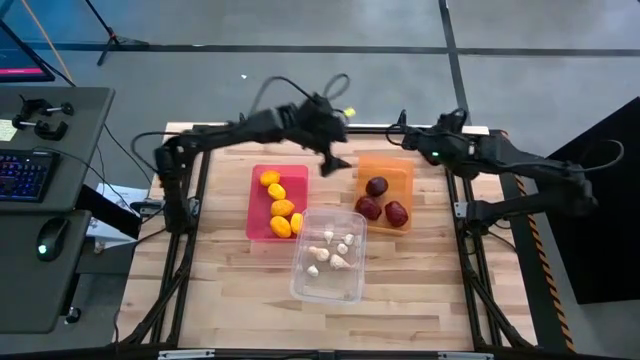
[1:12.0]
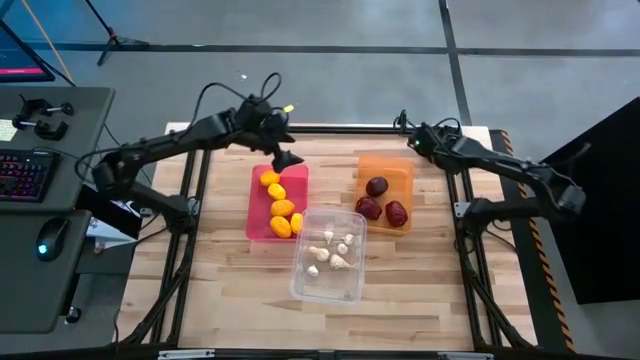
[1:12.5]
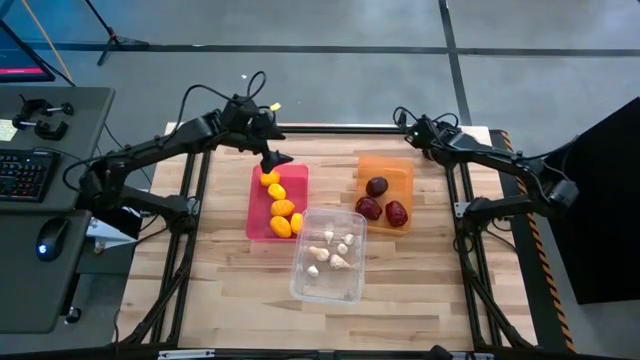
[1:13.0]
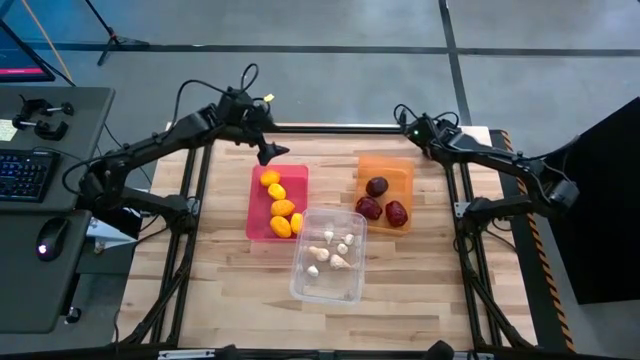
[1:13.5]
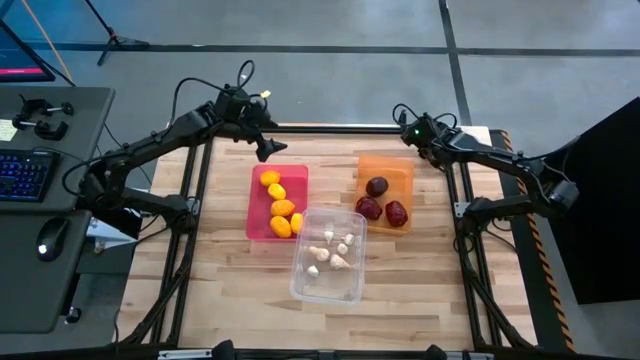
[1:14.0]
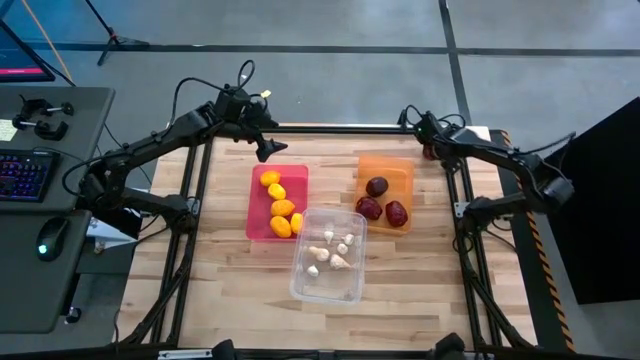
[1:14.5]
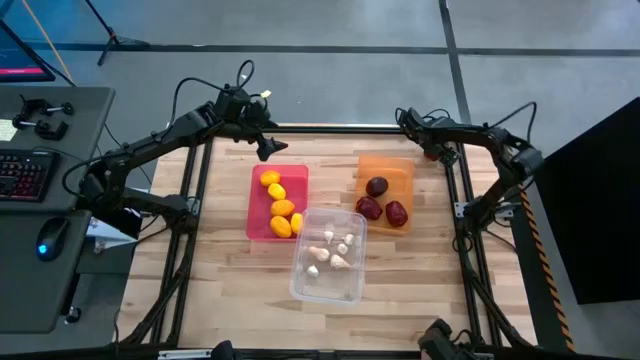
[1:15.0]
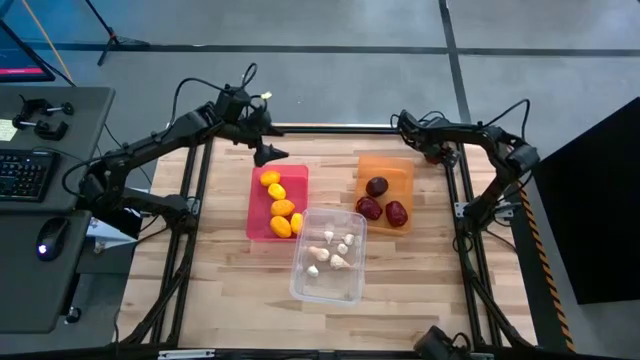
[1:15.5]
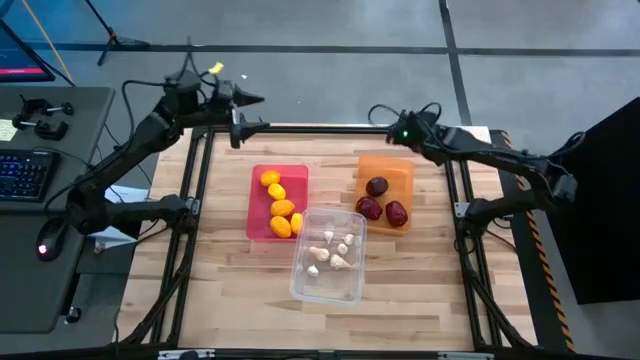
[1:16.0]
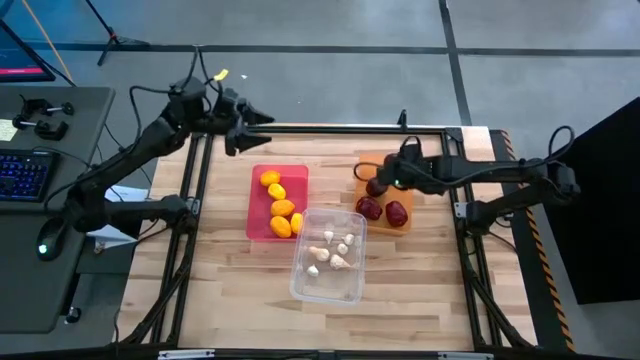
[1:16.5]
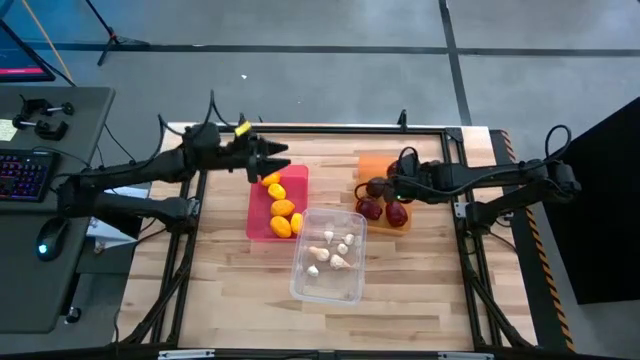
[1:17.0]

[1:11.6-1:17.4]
Task: Sort produce into baskets
Put the apple into the orange bin

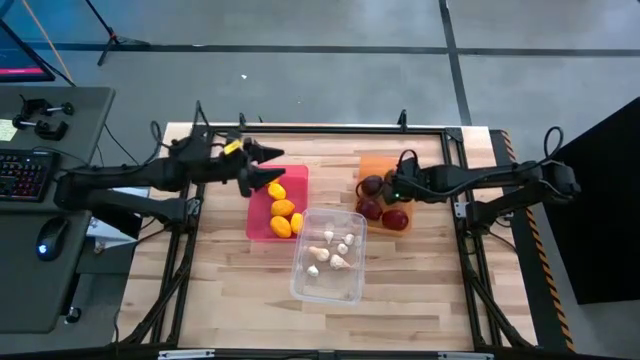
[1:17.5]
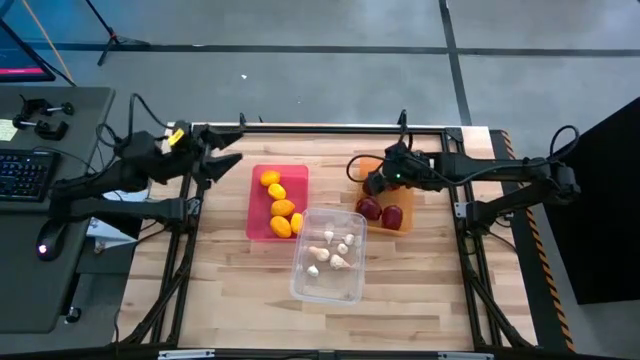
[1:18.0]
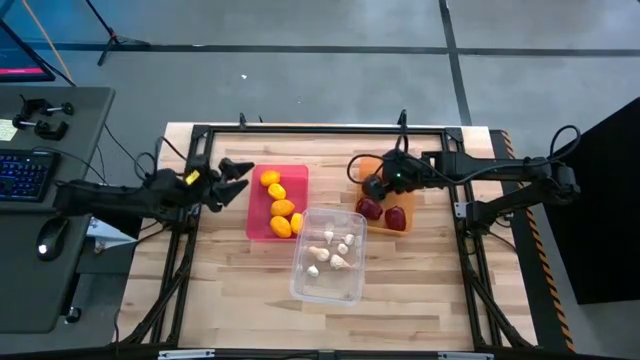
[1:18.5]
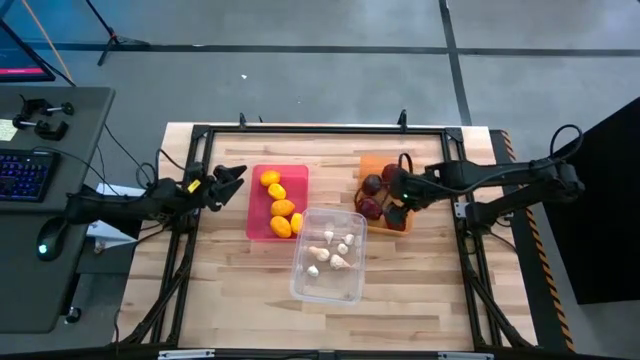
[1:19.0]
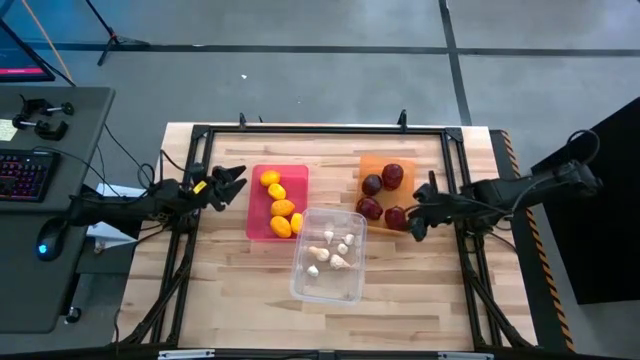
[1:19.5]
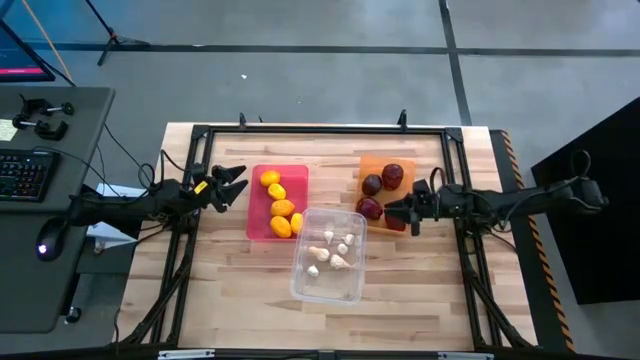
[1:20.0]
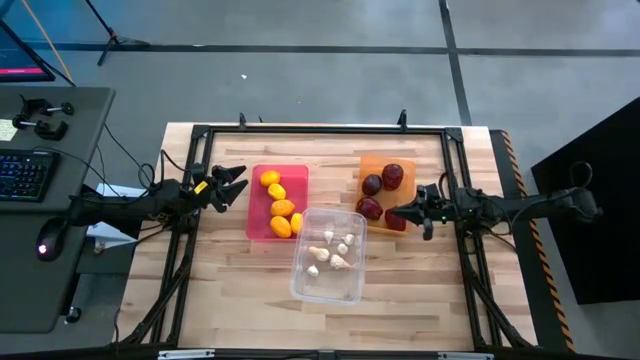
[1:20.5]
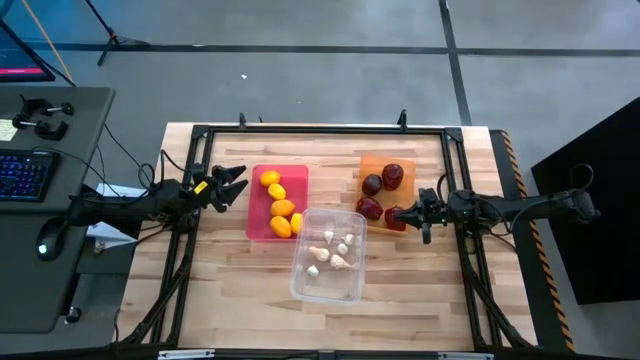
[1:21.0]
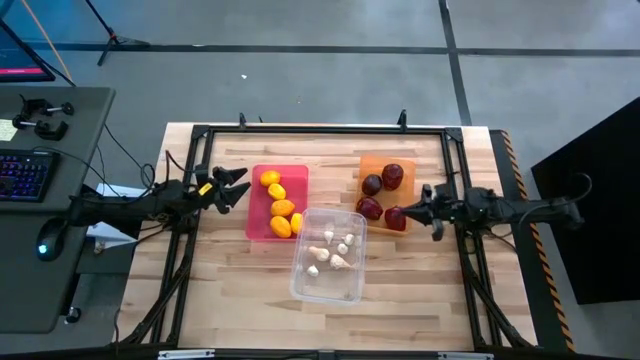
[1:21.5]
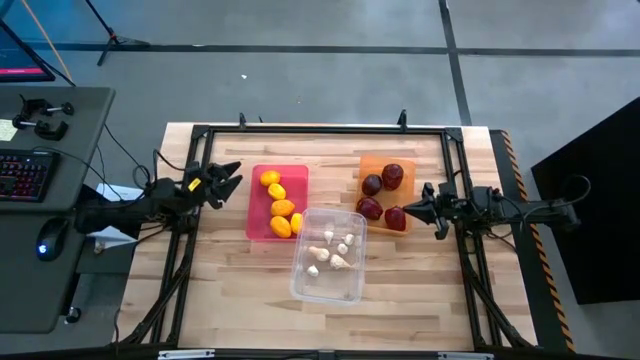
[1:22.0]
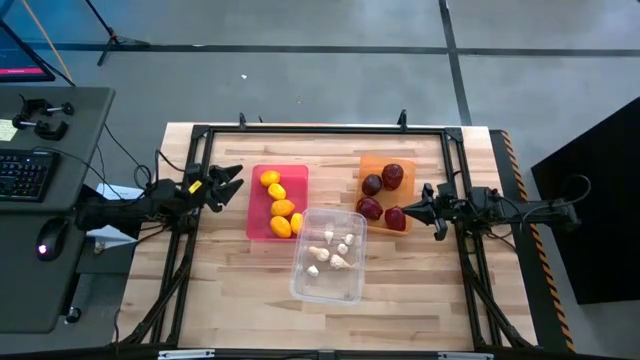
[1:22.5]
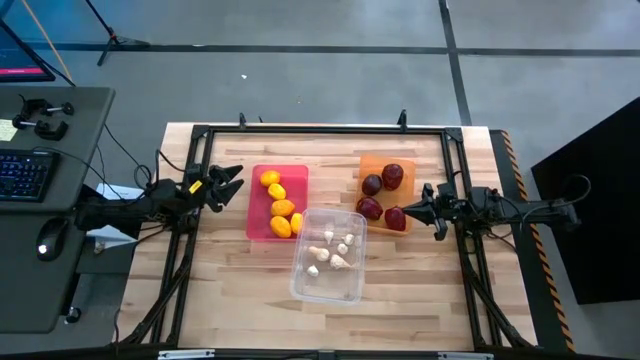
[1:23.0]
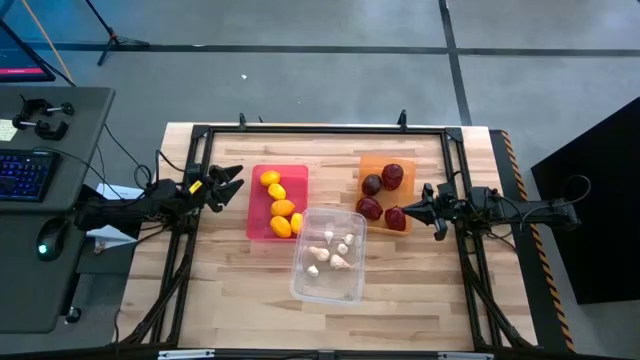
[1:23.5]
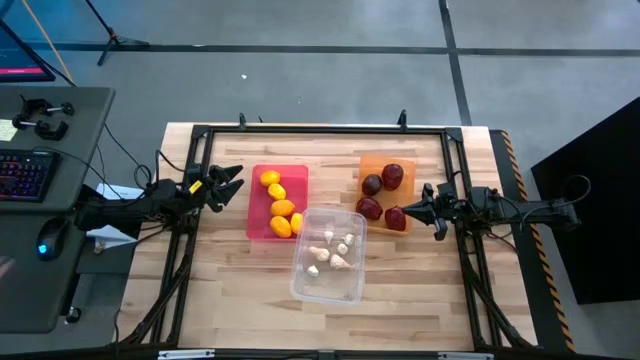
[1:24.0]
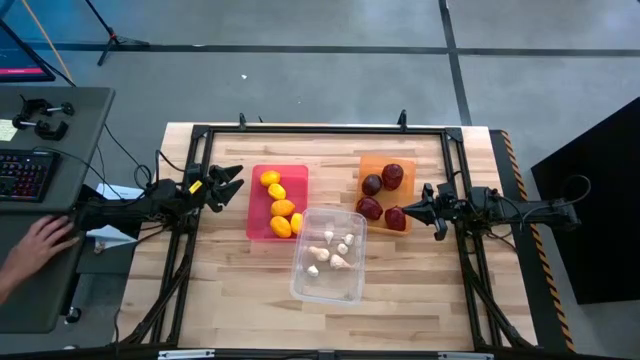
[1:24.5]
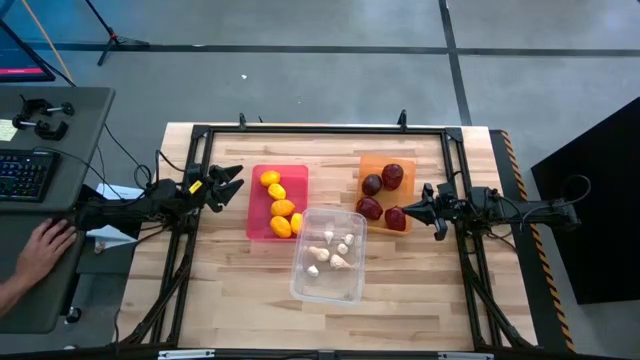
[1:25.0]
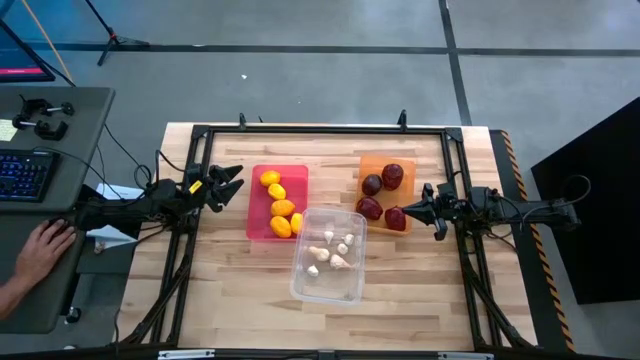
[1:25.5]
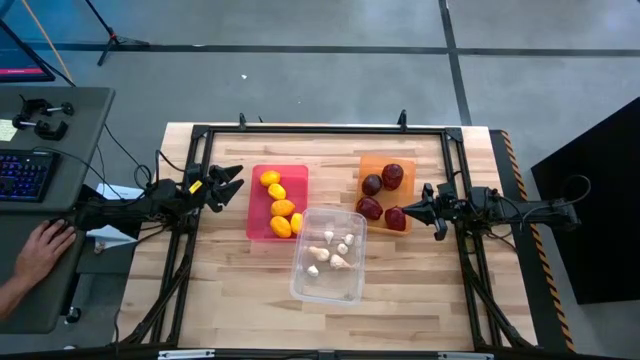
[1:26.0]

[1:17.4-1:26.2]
Return to Home Position

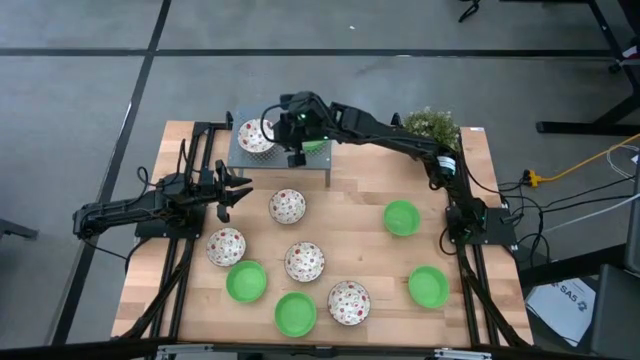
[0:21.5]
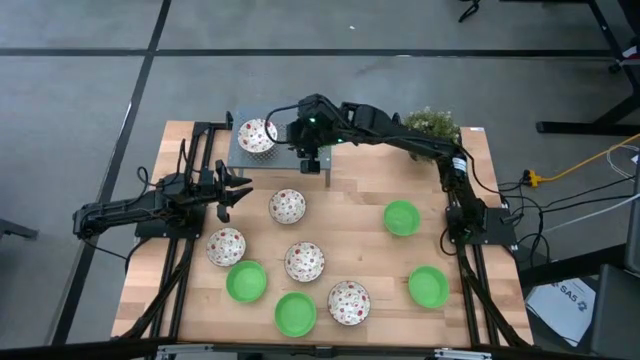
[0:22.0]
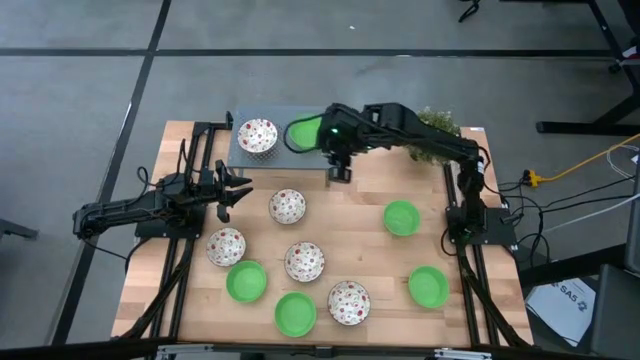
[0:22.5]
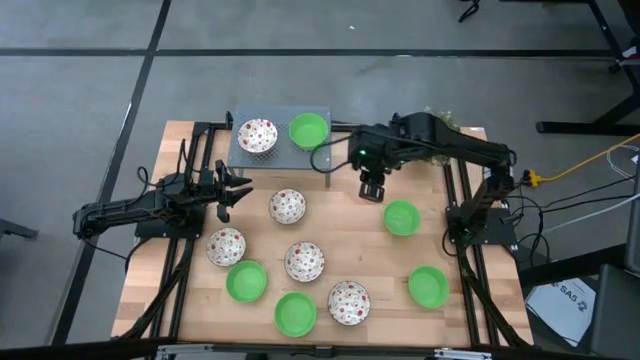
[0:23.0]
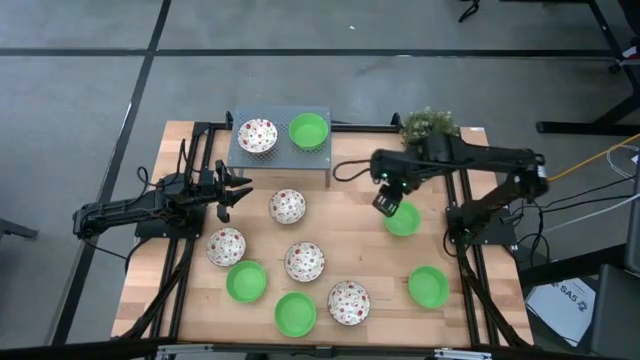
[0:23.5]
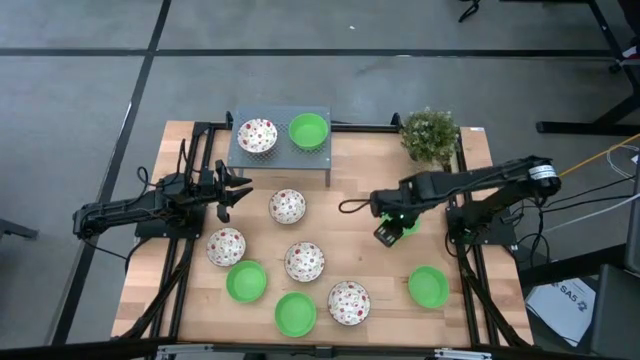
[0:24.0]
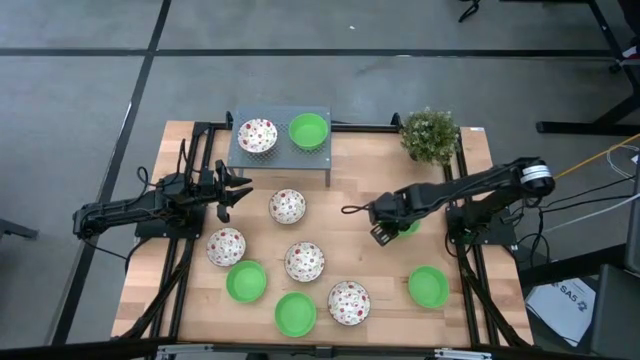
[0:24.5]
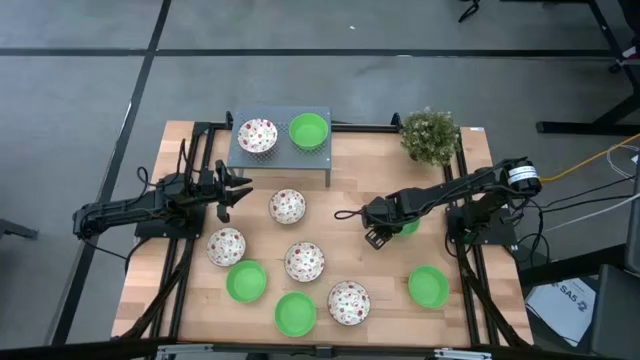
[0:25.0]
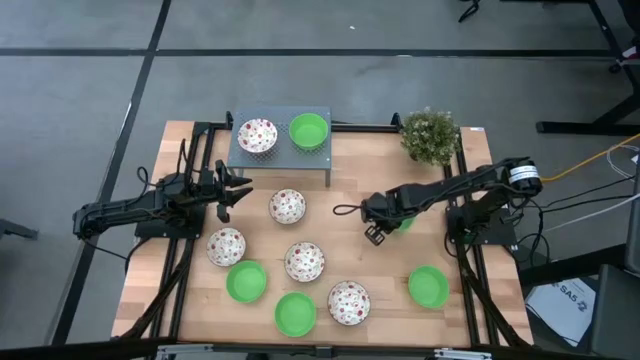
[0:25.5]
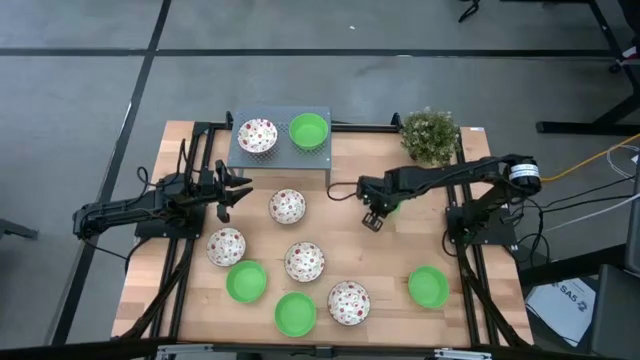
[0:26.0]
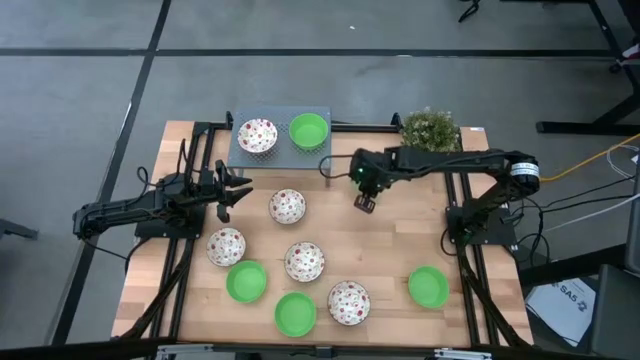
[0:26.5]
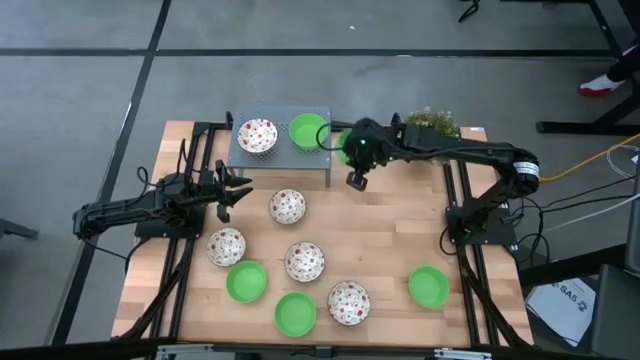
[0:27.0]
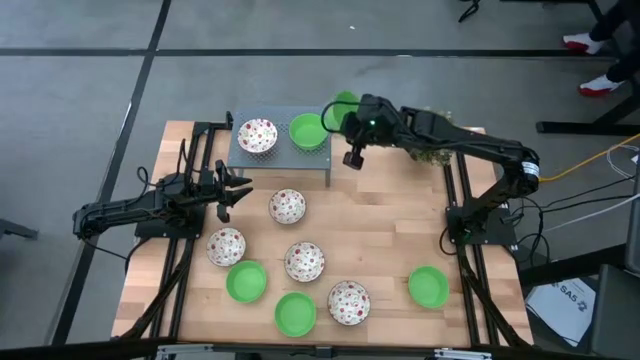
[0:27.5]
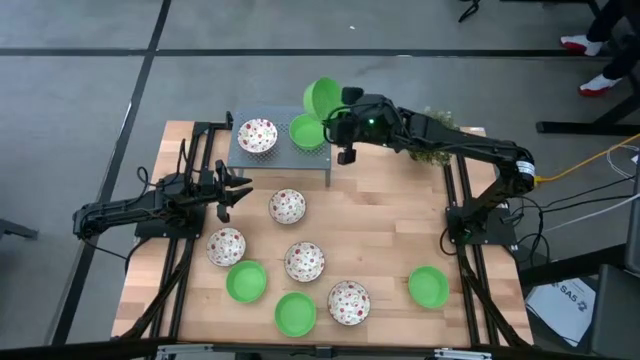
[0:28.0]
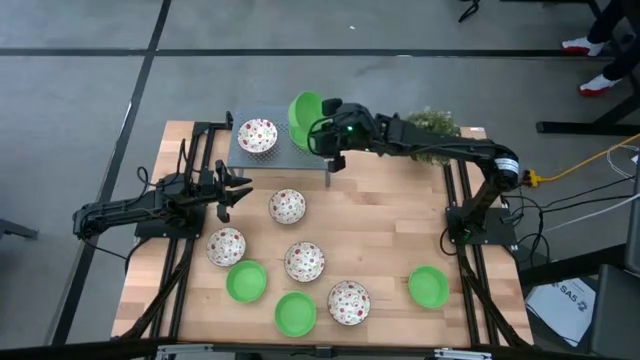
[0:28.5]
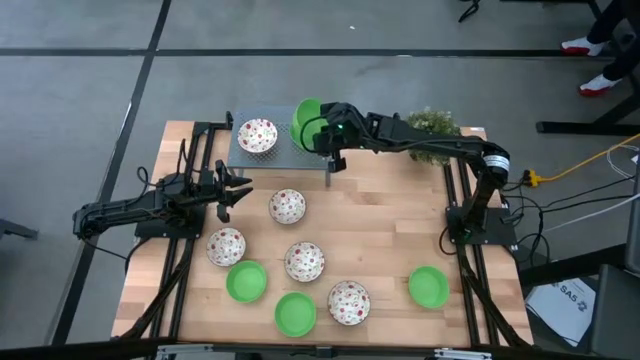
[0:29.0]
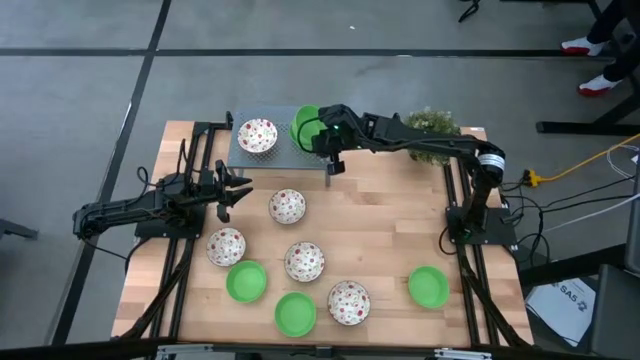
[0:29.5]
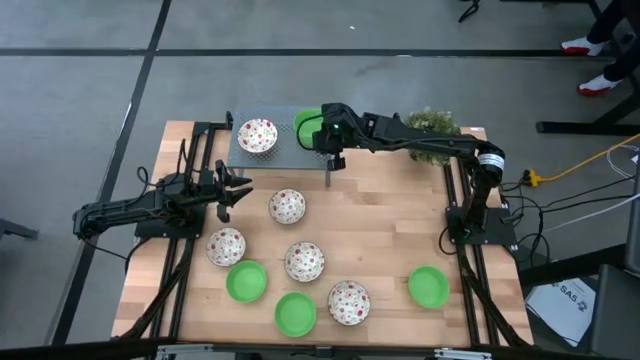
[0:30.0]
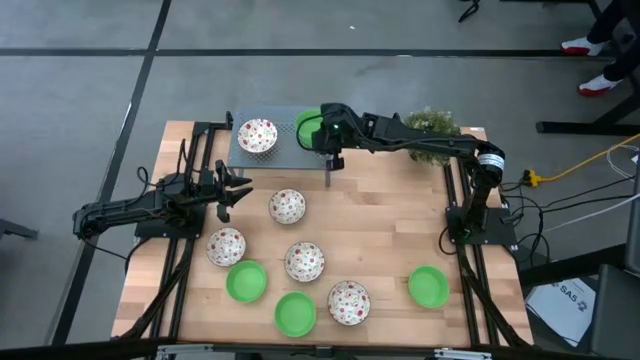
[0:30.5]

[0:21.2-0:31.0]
Task: Pick & Place Mini bowls
Stack the green bowl on the green bowl on the shelf
